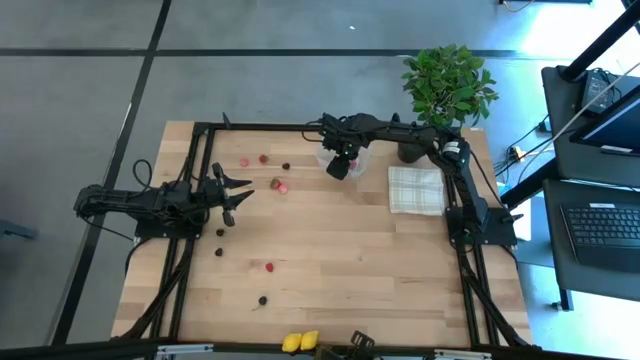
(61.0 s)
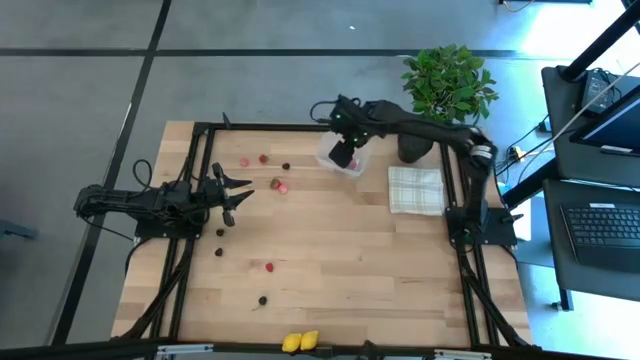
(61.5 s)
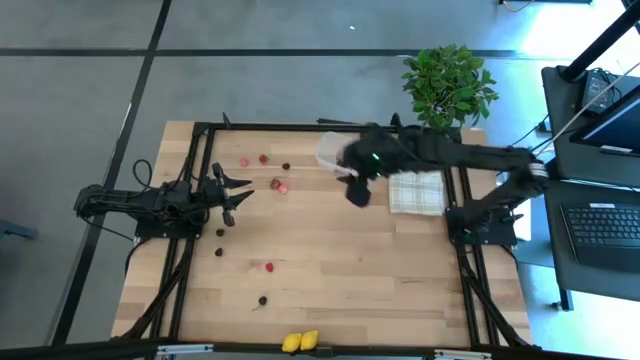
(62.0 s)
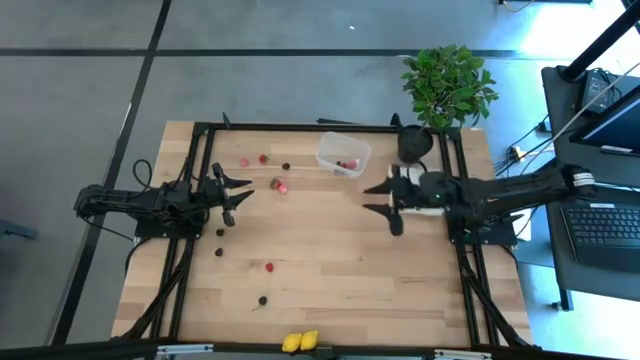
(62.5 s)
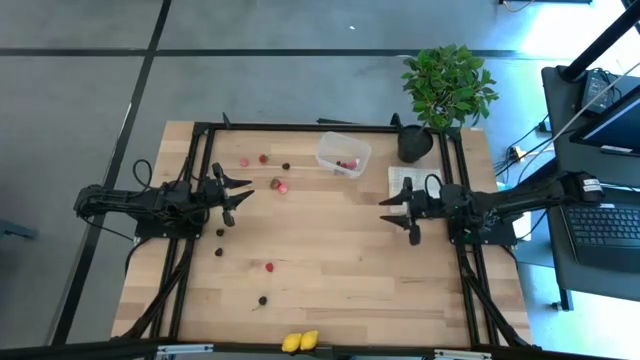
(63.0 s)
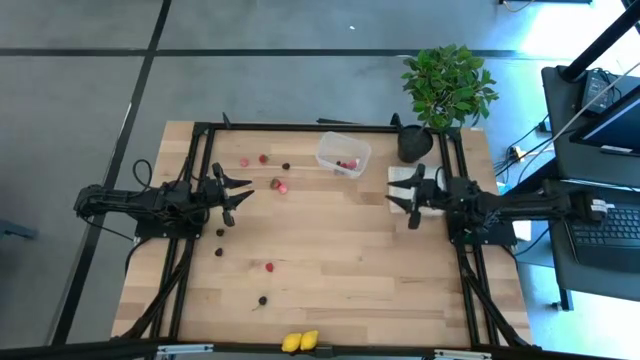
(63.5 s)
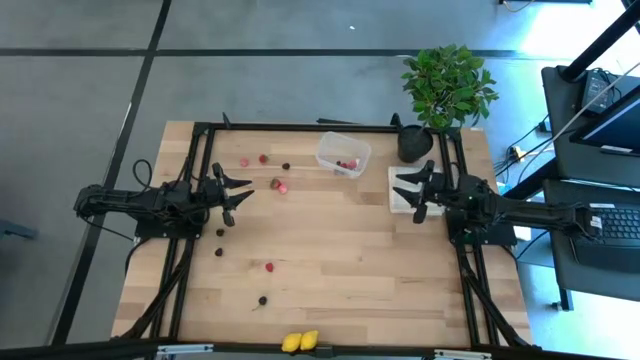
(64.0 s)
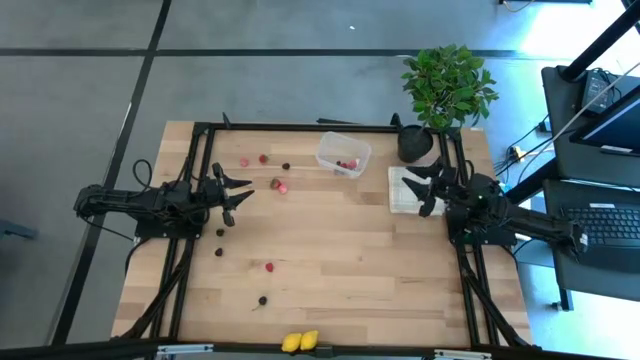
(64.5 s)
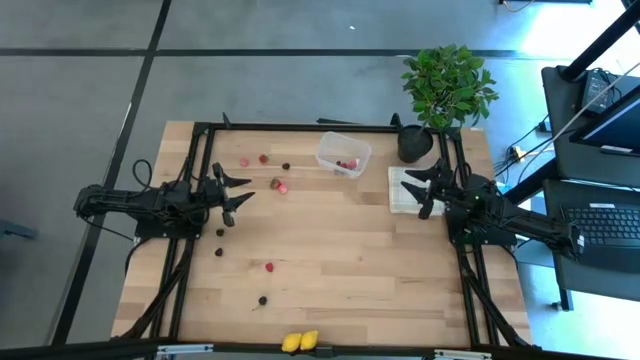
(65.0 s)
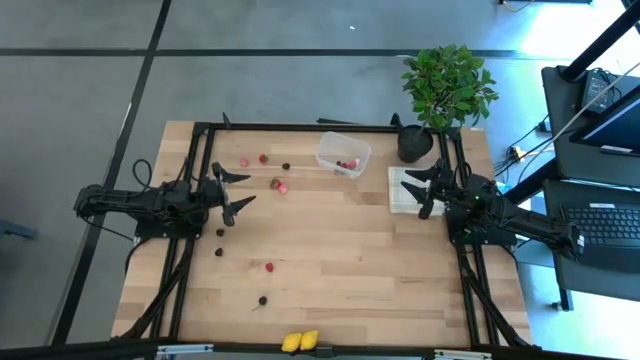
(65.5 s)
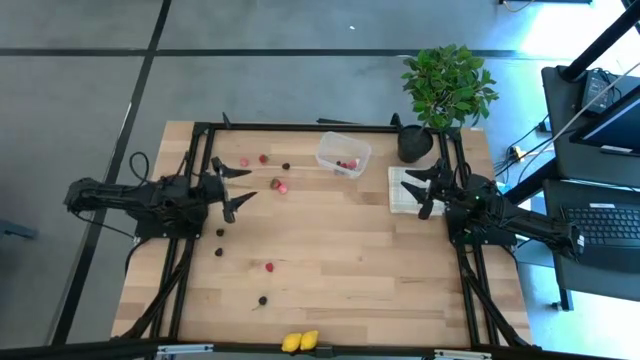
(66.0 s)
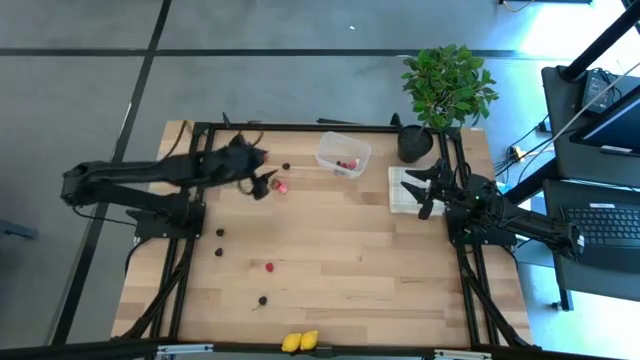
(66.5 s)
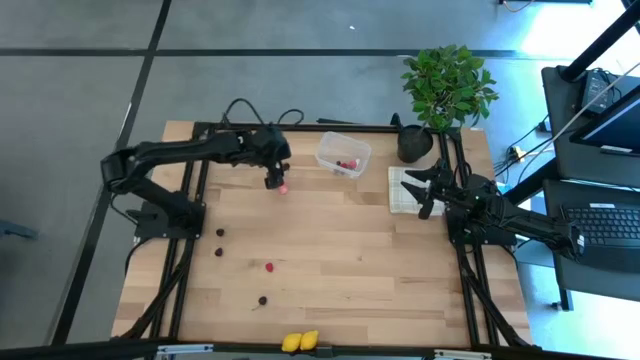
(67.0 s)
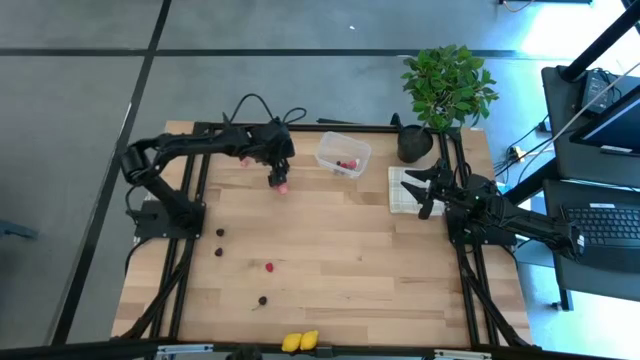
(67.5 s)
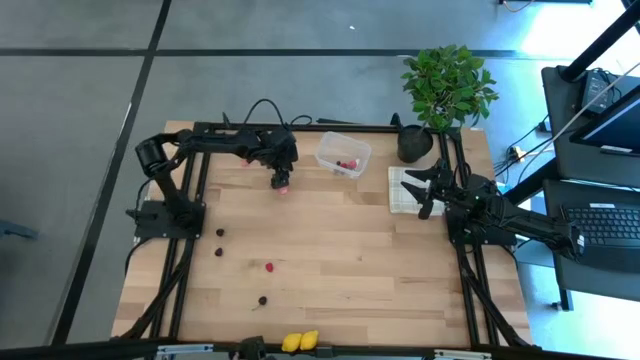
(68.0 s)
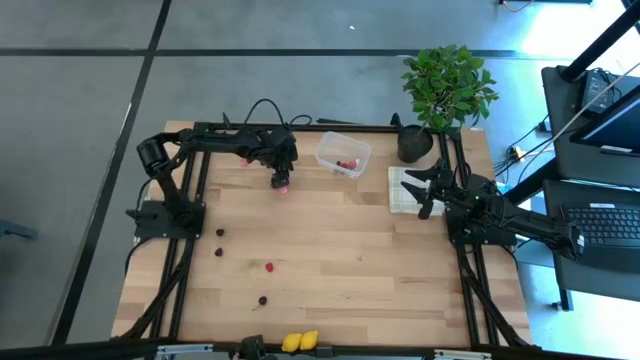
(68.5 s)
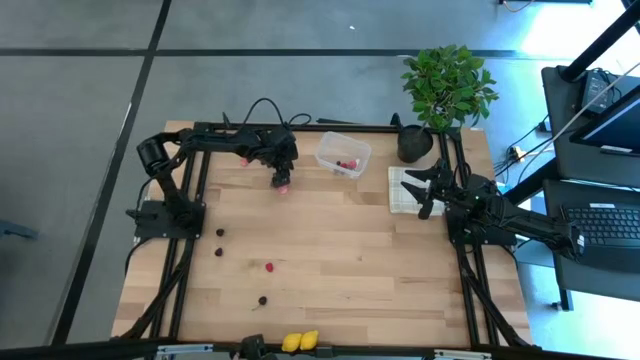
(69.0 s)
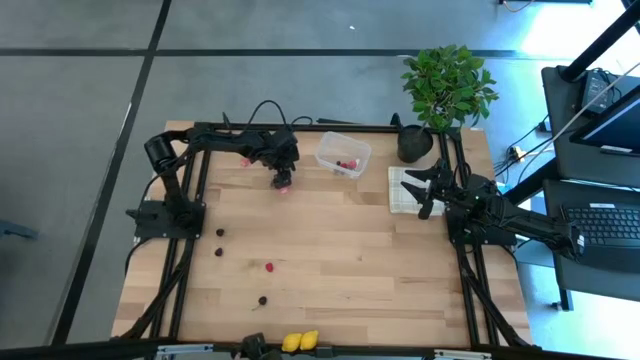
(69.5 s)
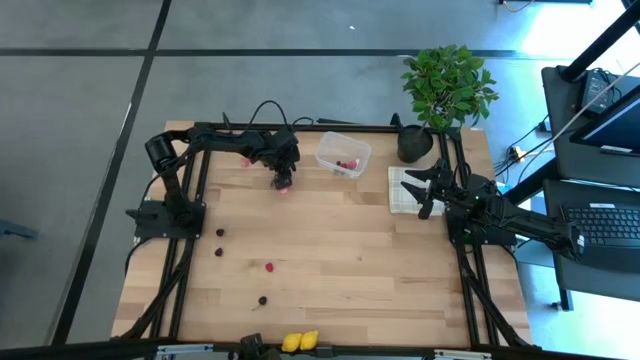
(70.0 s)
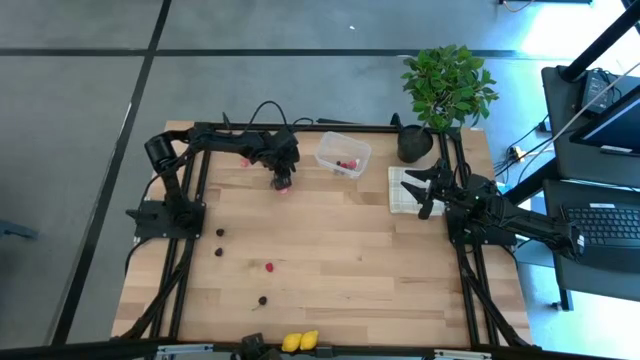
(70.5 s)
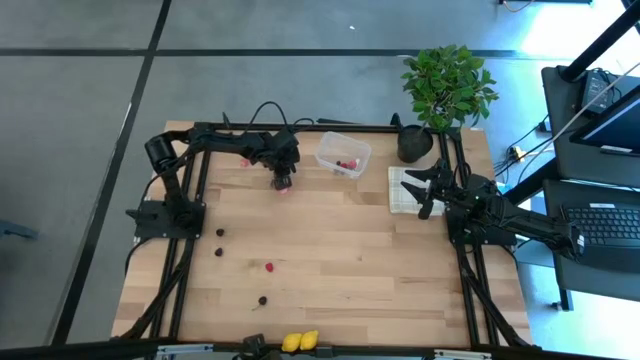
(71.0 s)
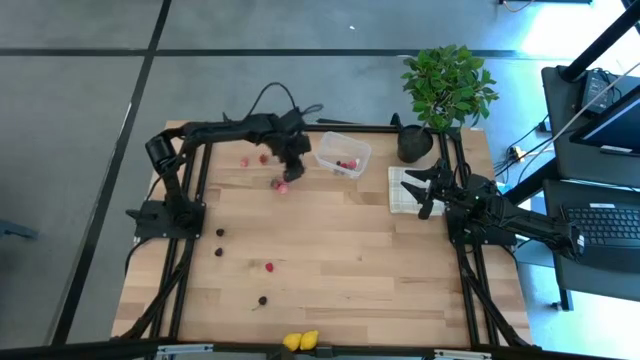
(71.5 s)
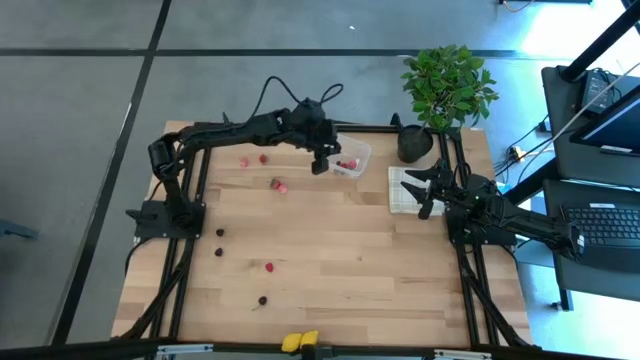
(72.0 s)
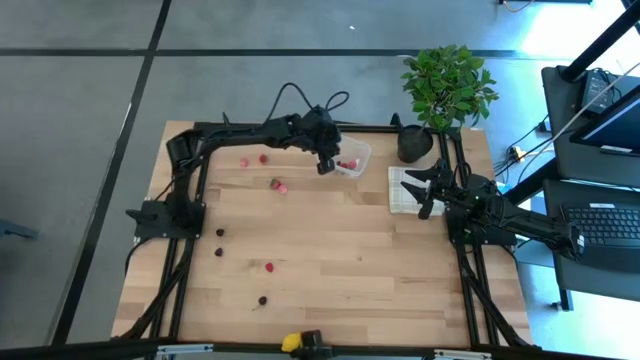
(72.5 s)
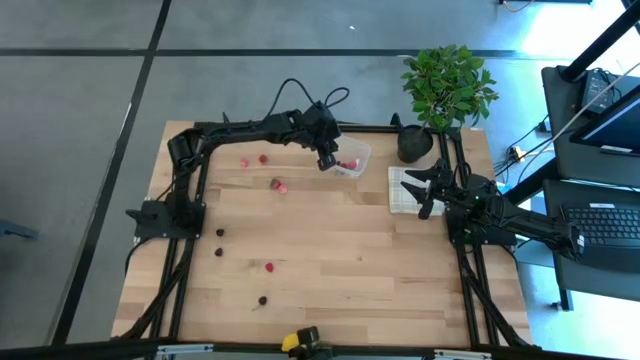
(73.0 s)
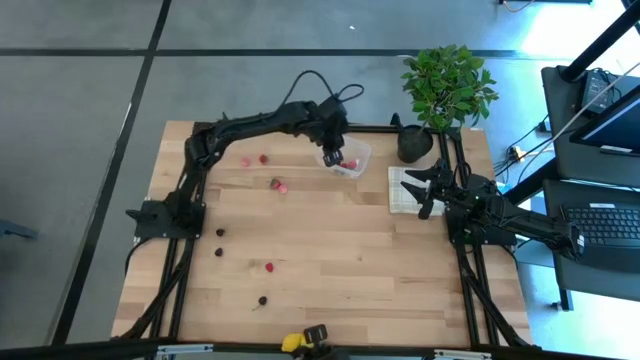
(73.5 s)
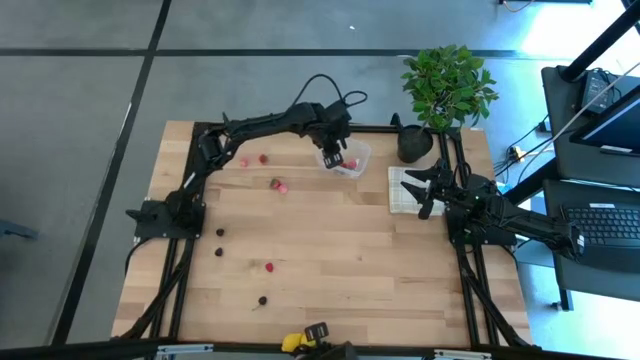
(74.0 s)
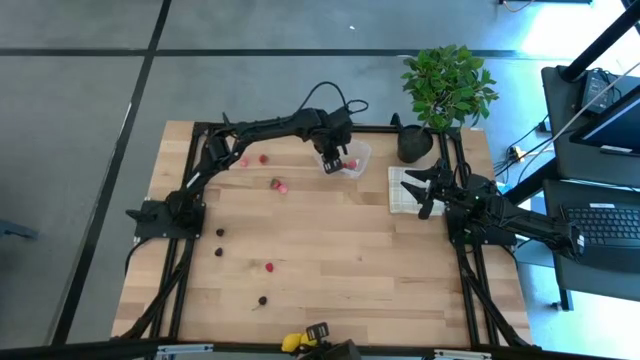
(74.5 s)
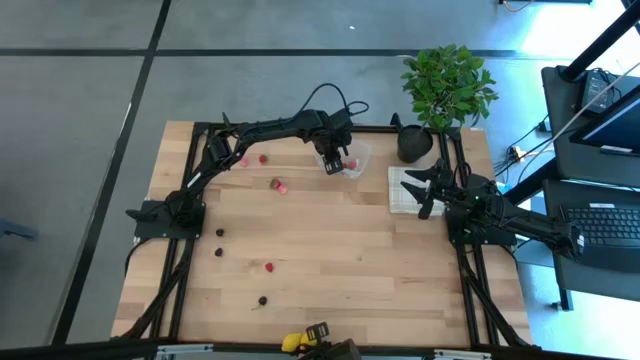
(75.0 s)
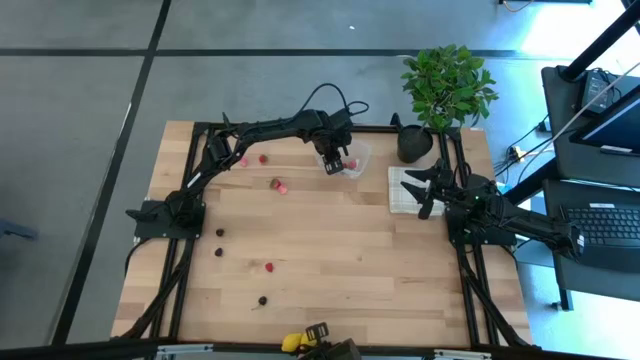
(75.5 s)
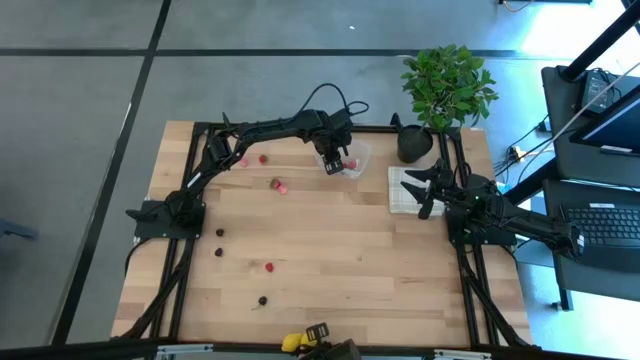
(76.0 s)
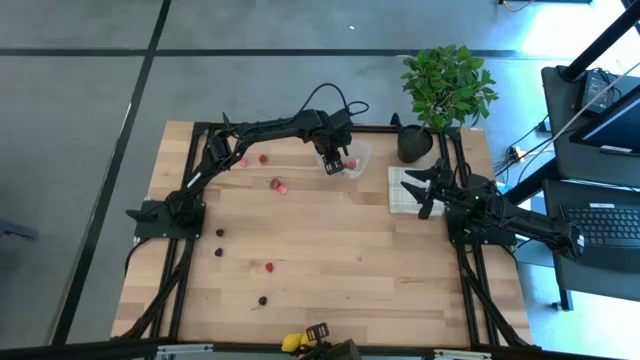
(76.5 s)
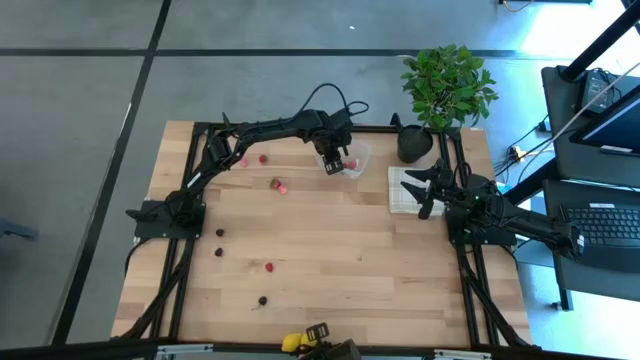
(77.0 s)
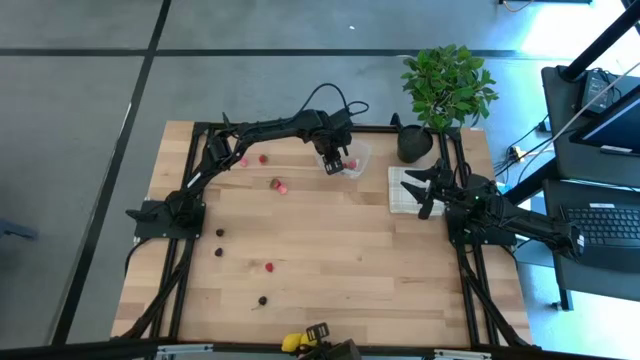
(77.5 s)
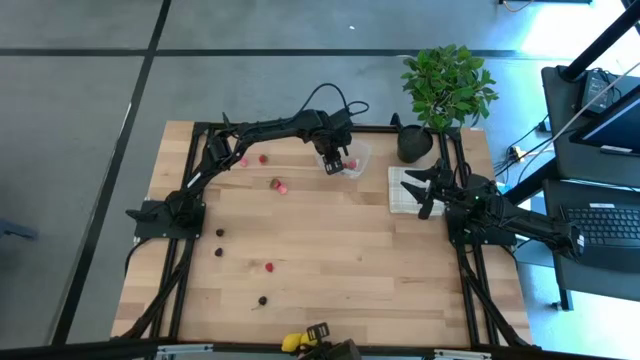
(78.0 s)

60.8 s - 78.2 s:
Task: Pick and placing Produce into tupperware
Put the top blackberry into the transparent container

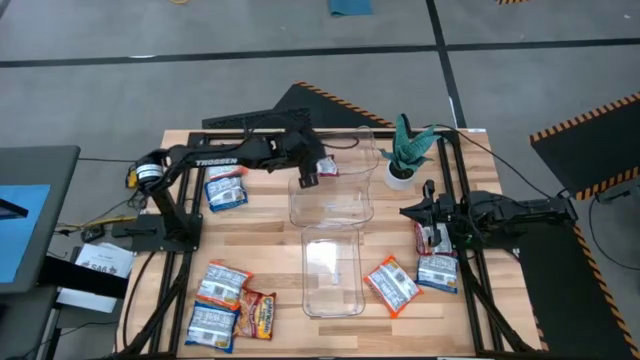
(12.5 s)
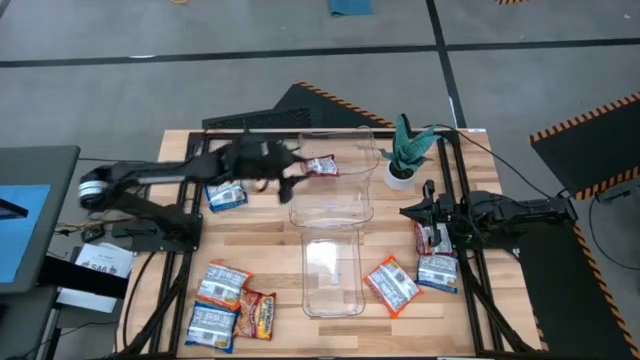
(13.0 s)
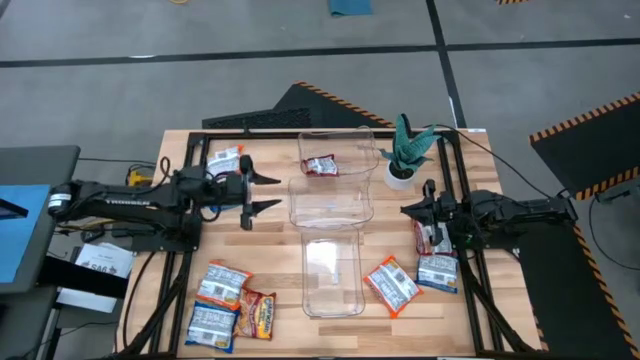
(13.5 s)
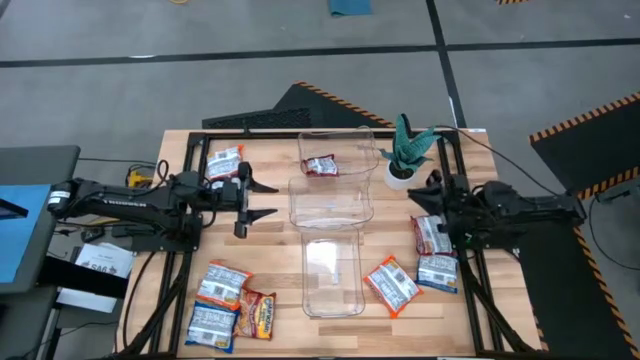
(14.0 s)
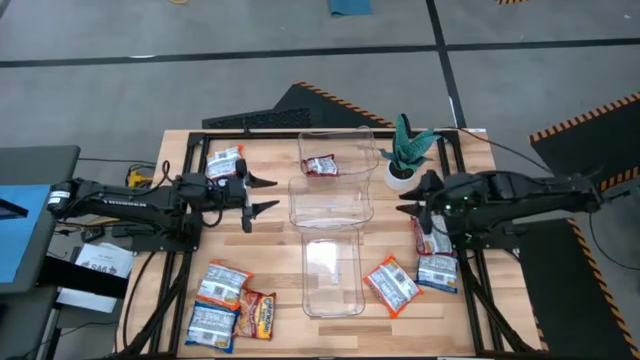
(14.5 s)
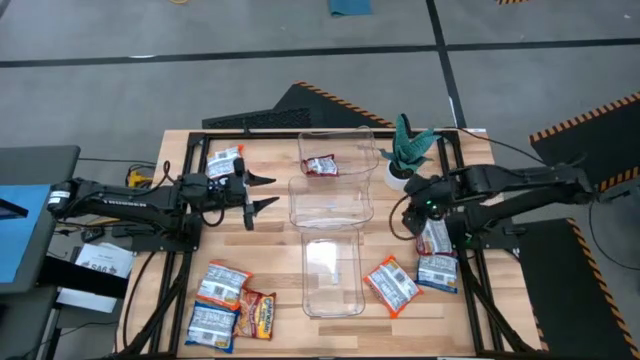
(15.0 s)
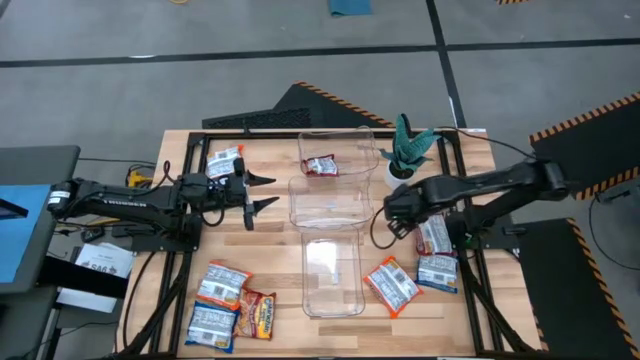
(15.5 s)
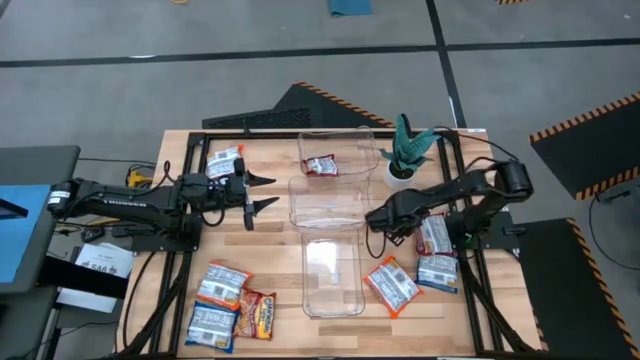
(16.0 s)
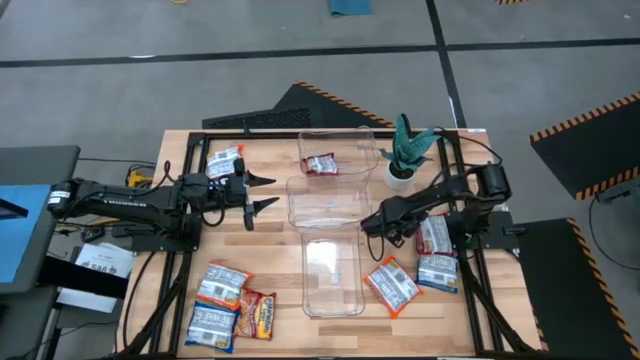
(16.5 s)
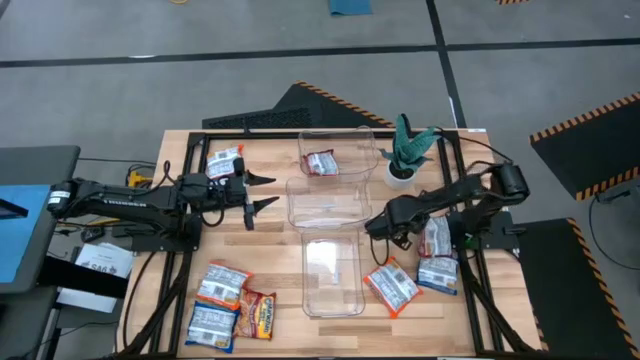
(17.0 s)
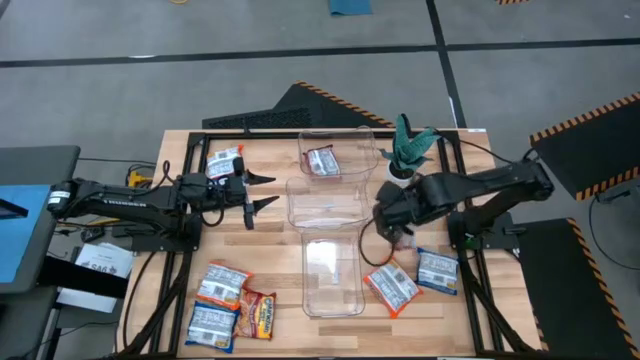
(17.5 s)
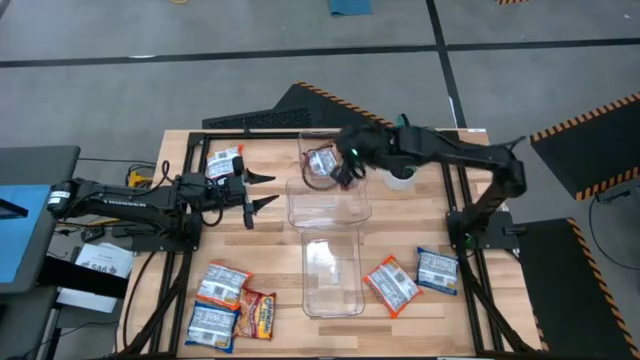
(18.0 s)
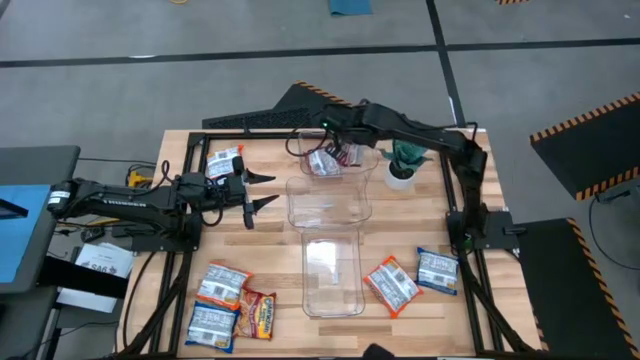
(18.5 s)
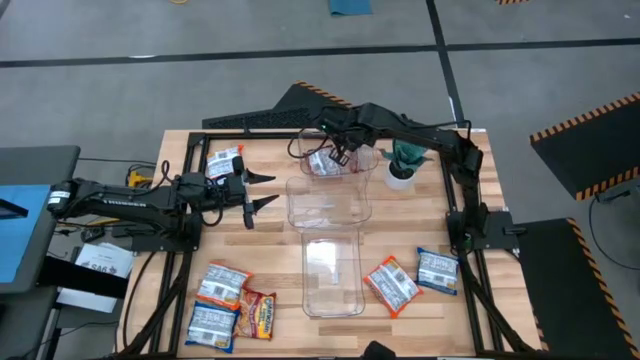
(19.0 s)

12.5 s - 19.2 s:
Task: Sort Maruchan noodles
Put the top red noodle pack into the top transparent bin
